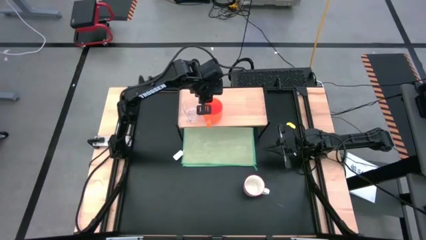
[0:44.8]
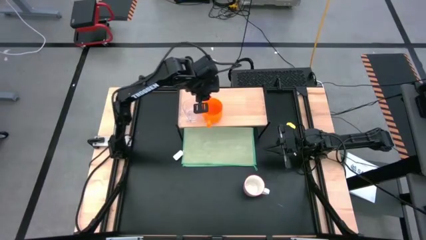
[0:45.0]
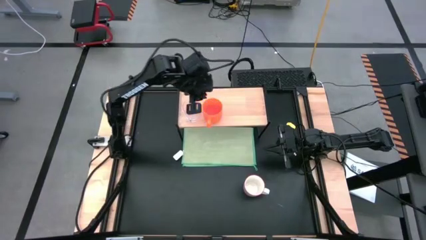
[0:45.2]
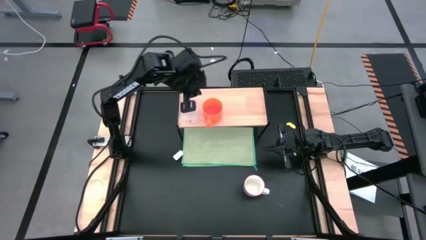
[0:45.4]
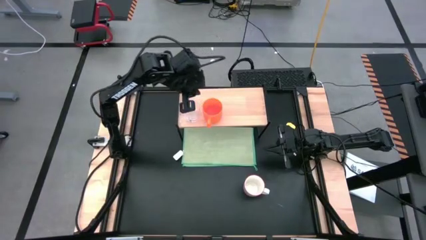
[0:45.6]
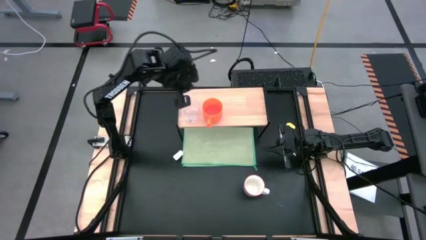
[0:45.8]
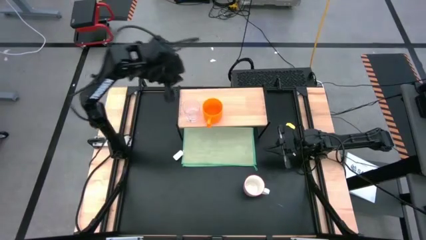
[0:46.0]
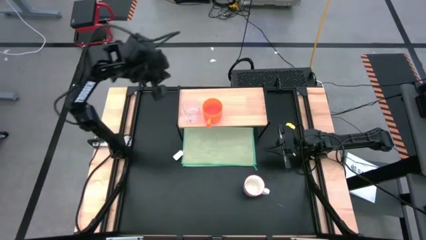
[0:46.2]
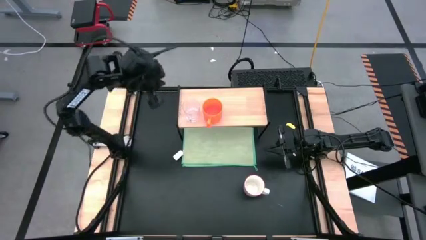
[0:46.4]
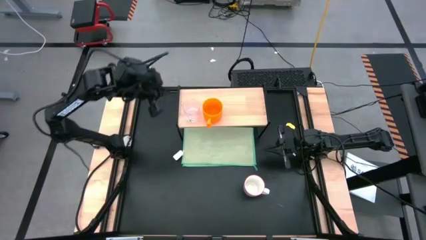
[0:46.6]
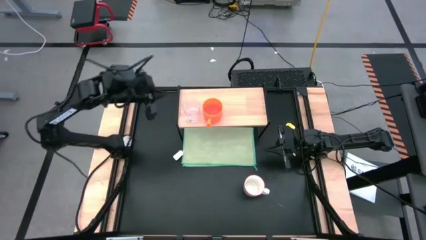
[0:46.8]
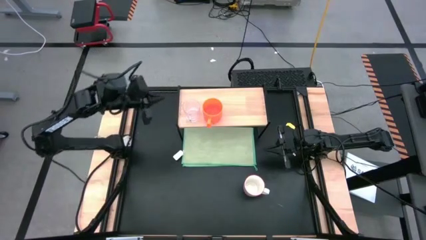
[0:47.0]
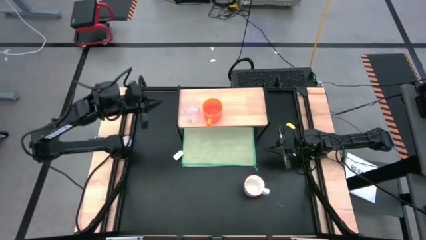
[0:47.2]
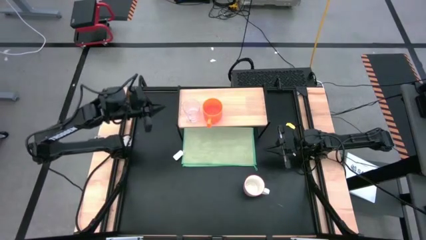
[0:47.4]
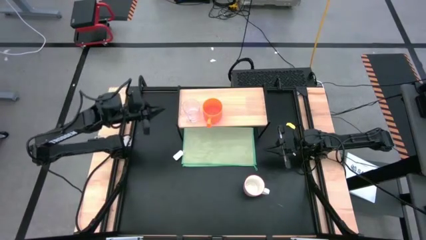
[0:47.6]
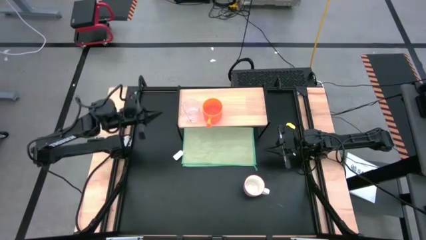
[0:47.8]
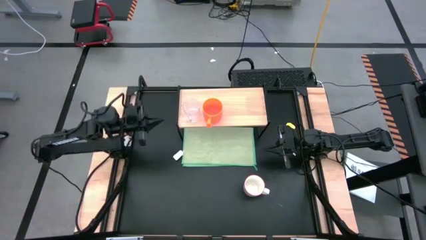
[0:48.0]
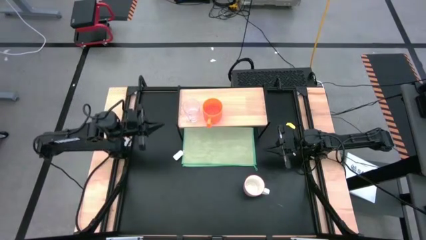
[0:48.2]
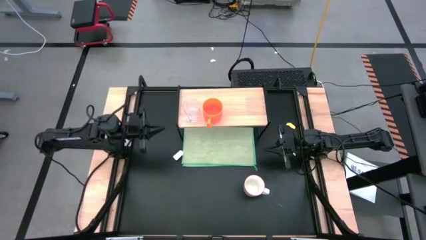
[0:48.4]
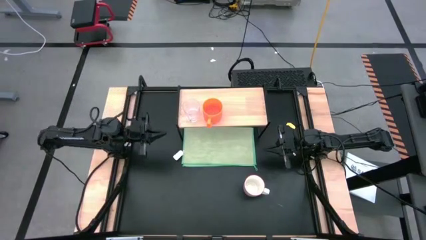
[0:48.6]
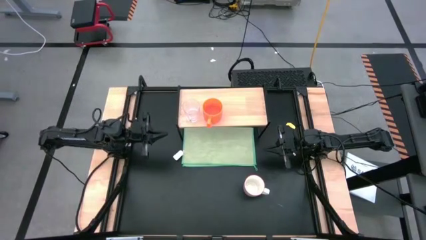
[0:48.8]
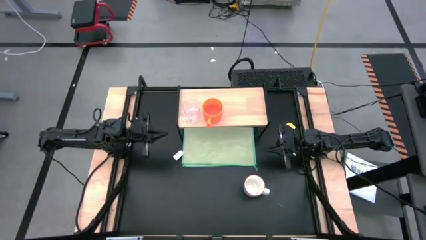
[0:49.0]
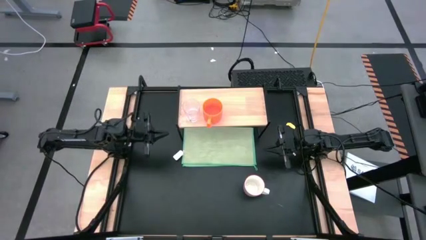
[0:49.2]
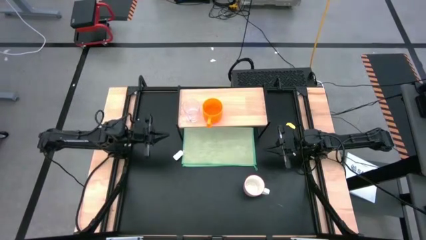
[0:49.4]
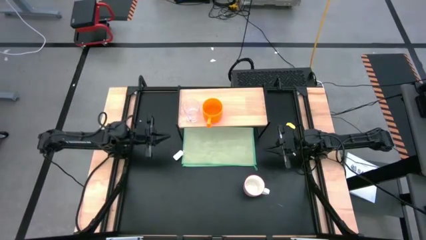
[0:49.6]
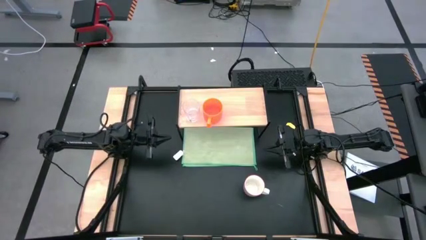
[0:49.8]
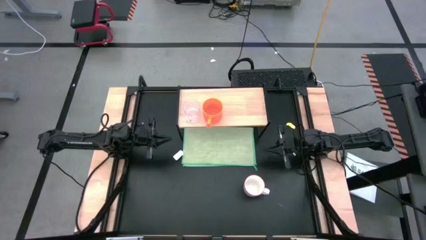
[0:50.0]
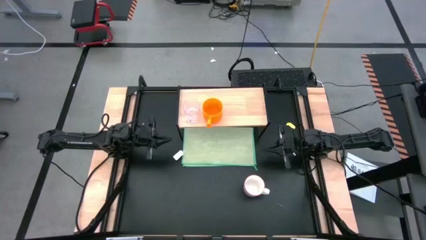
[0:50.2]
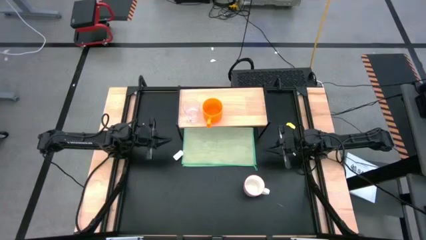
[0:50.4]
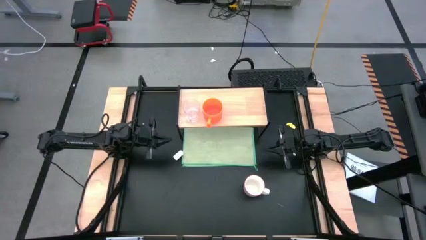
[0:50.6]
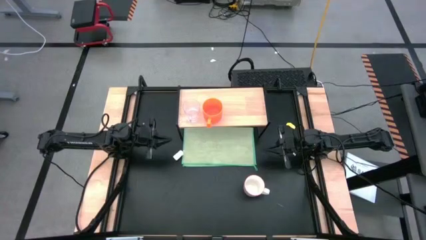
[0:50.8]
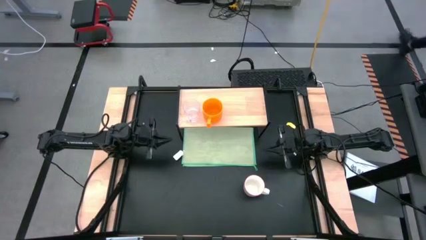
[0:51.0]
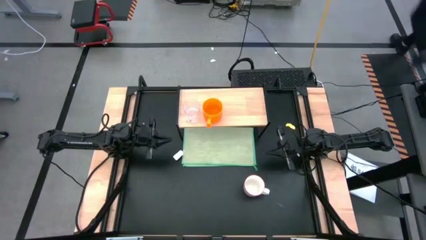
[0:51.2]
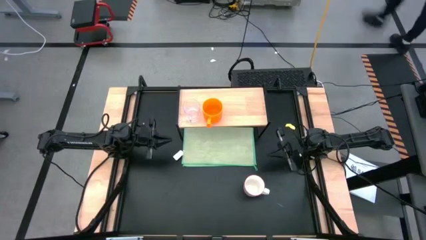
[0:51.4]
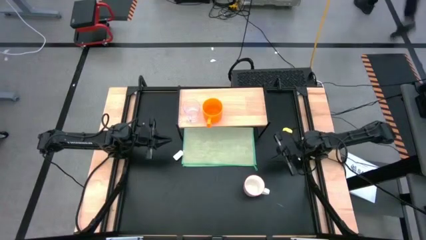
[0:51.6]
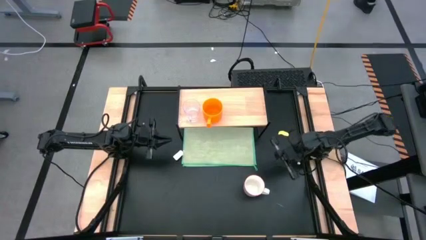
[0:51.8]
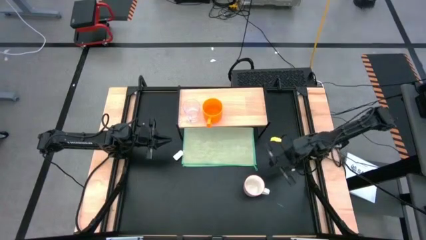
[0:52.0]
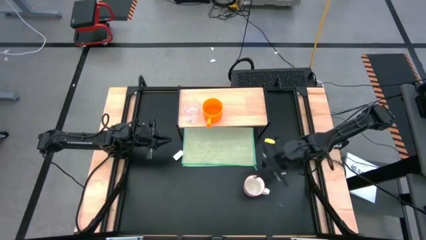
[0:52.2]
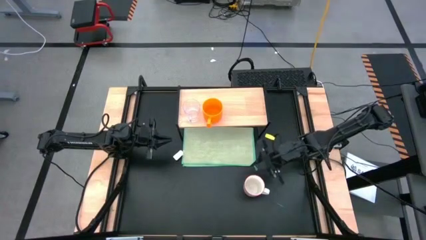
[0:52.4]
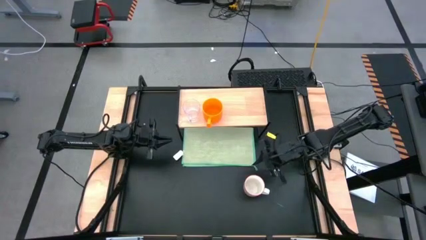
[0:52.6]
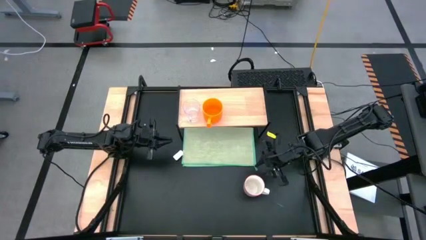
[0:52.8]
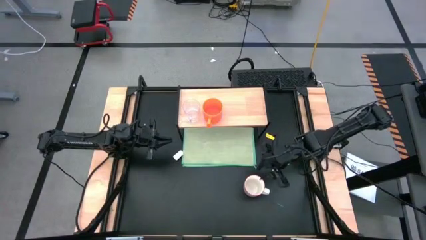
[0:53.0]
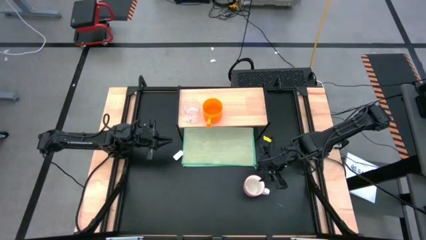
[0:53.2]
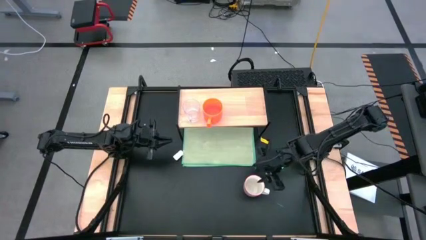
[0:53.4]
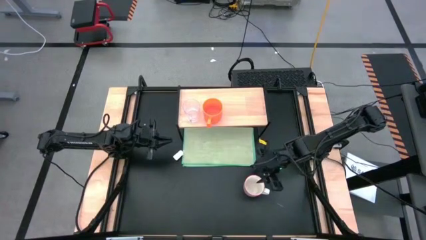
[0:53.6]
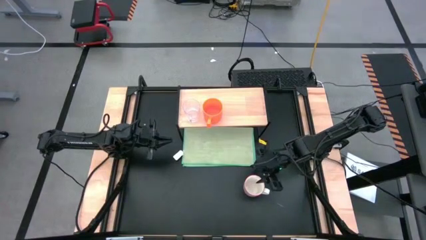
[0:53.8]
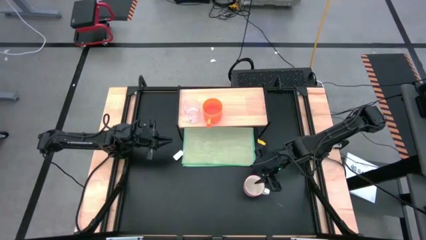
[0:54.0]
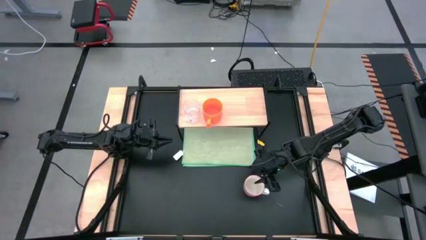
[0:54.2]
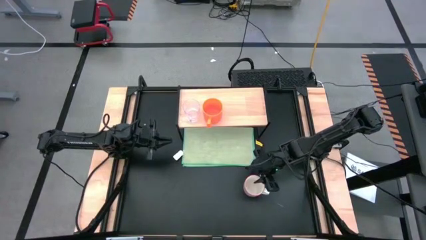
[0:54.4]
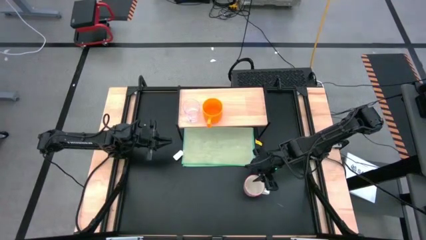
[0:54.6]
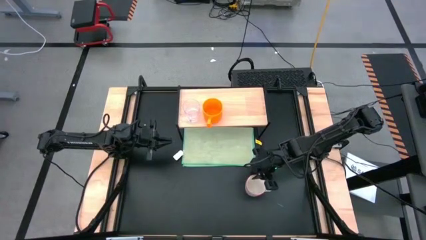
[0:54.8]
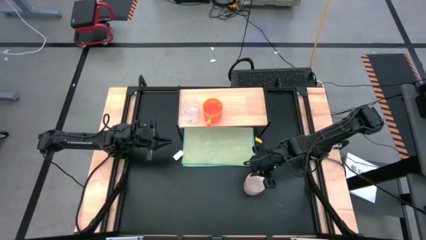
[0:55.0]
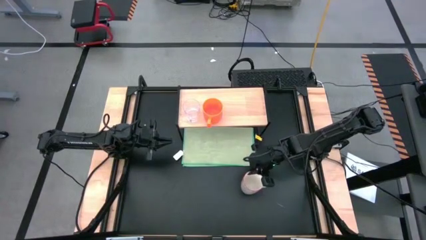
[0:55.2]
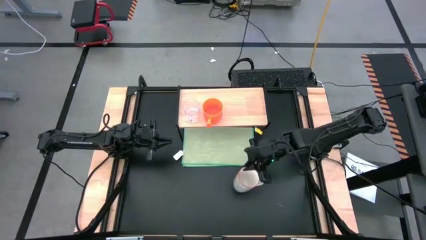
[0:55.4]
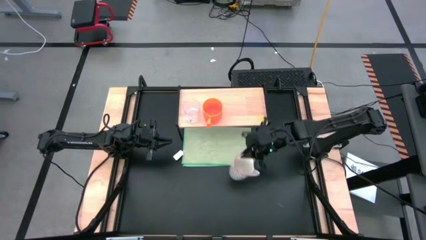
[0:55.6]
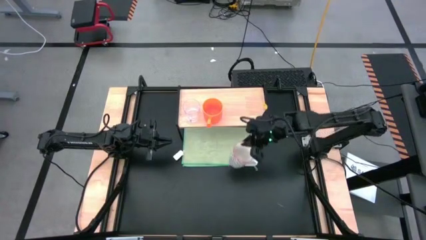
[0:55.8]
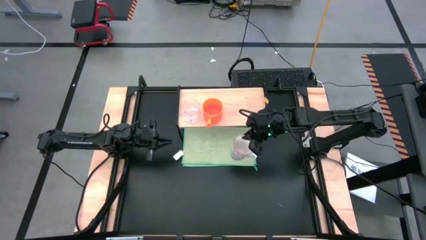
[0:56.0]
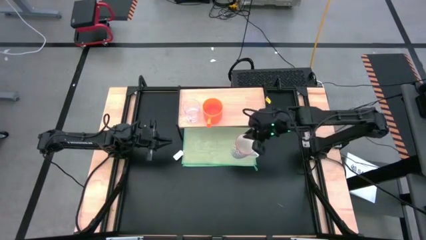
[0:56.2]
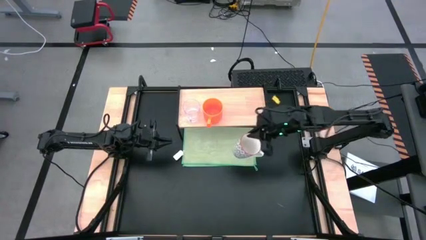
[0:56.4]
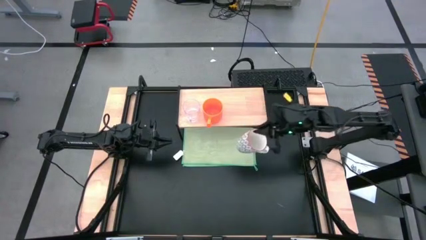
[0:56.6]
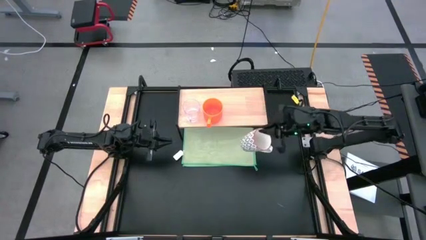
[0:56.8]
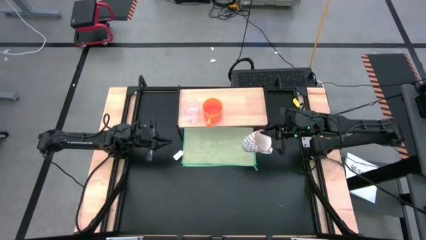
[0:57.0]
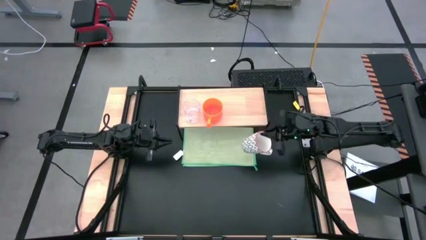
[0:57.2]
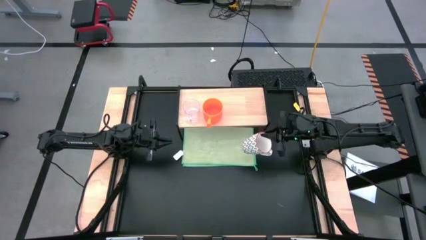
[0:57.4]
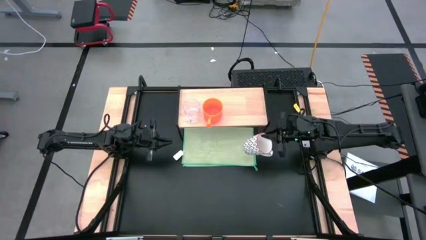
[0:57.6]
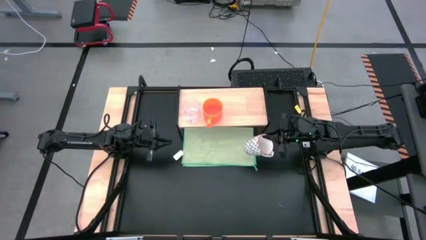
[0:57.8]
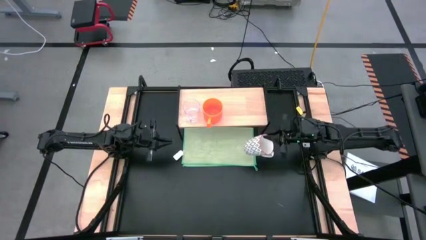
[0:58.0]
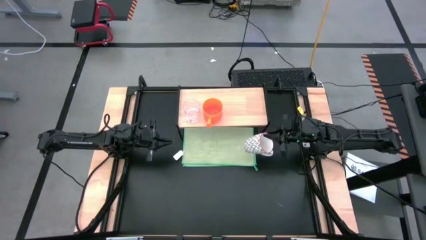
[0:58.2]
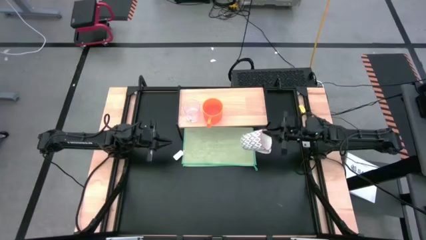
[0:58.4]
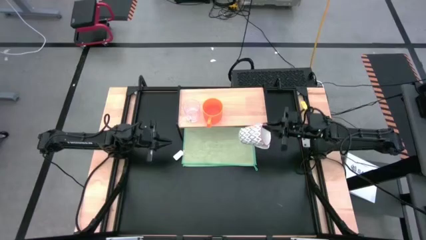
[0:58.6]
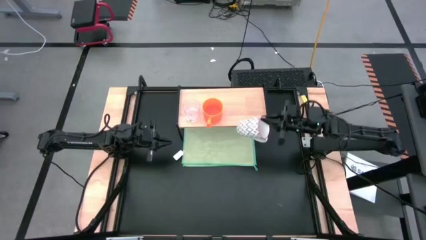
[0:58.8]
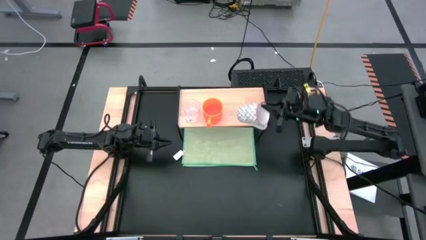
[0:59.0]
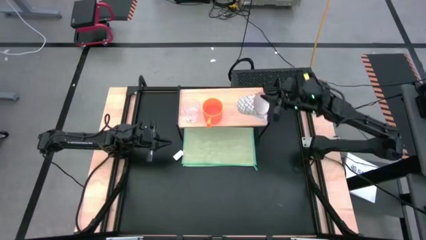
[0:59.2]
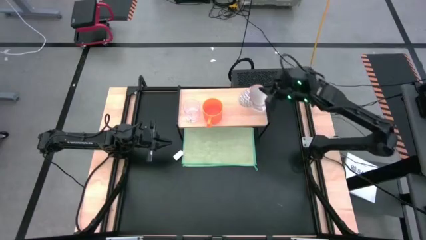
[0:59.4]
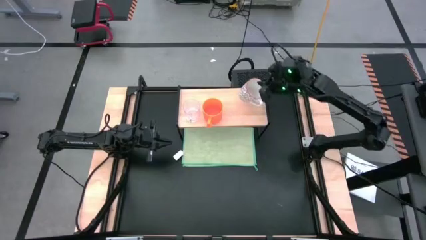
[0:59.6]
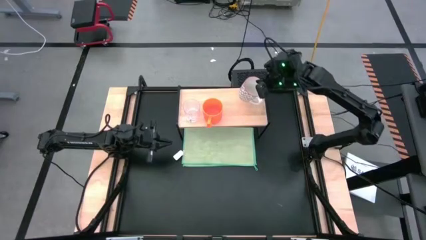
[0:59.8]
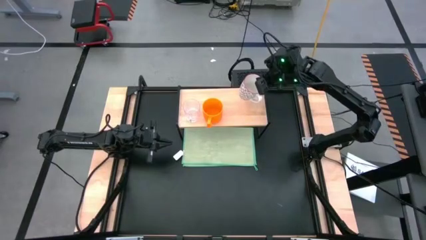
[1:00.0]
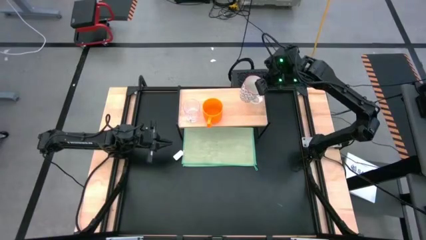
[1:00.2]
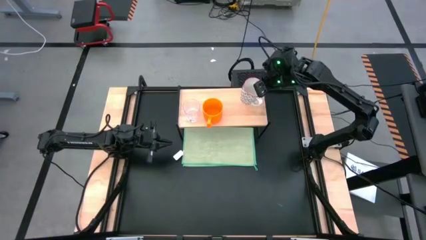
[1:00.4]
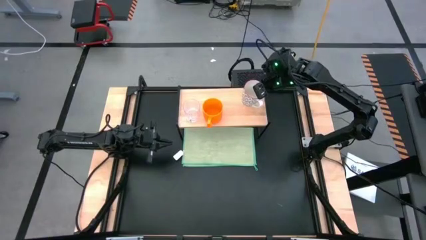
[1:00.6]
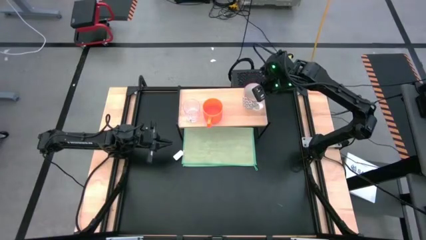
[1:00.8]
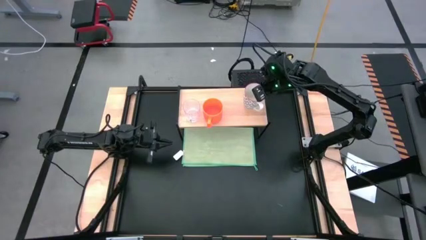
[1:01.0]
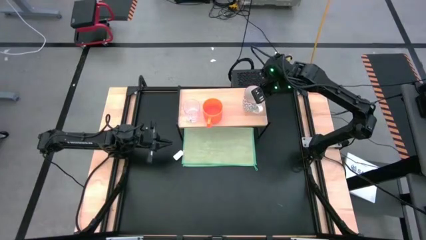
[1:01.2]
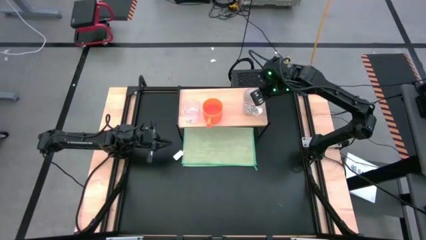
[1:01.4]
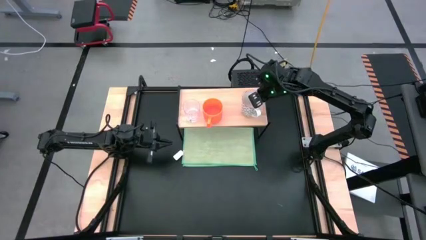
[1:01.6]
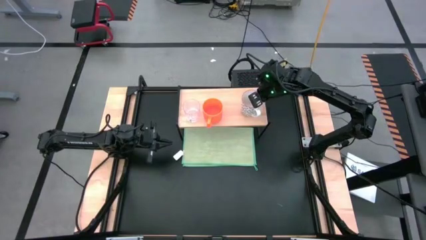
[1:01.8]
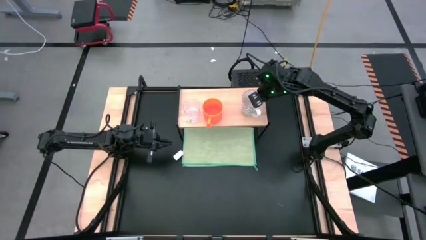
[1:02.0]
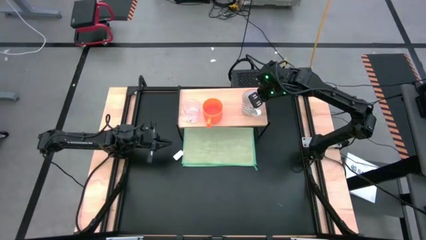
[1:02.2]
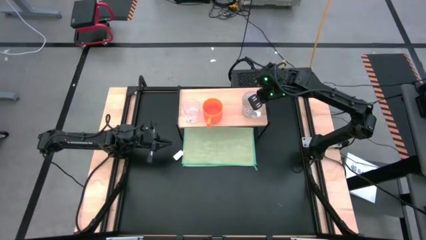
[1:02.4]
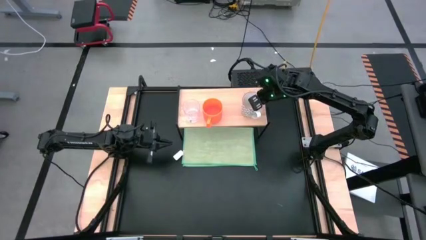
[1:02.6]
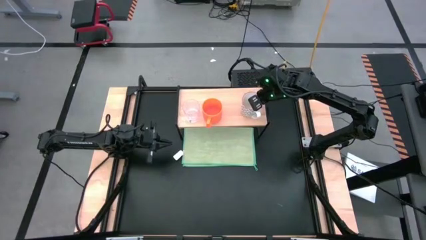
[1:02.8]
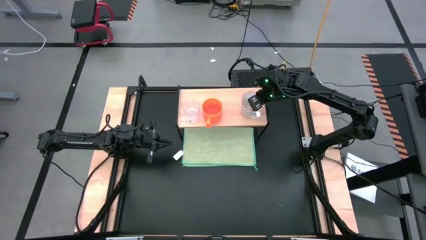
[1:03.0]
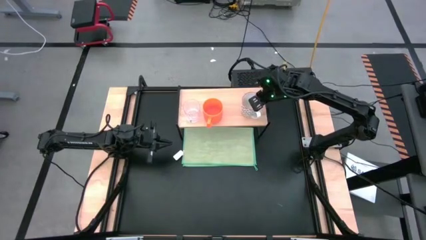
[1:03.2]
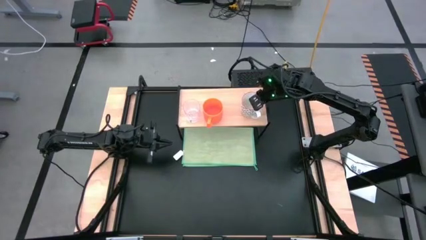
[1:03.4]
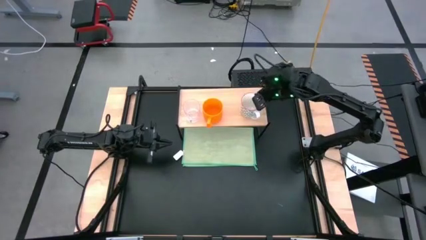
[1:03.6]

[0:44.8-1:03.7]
Task: Stack small to large cups/mugs on shelf
Put the gray patterned mug on the shelf
